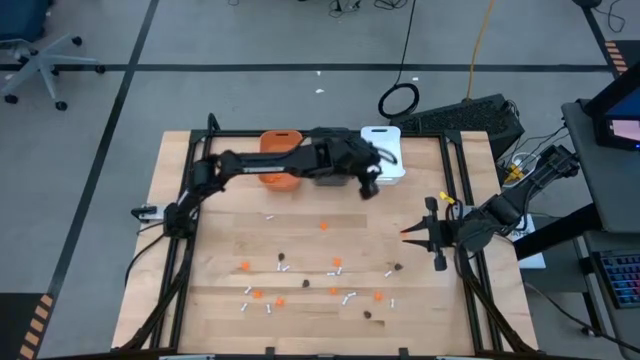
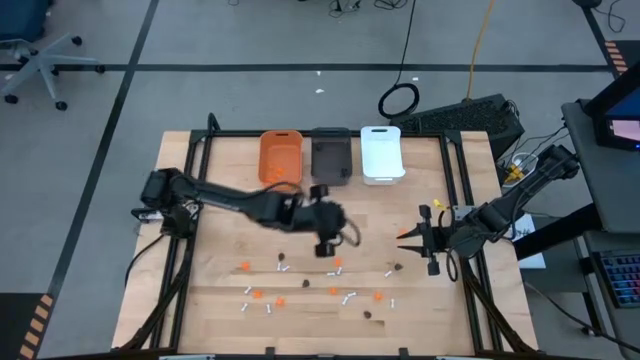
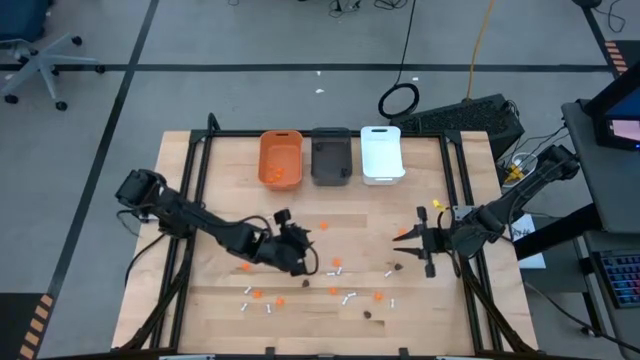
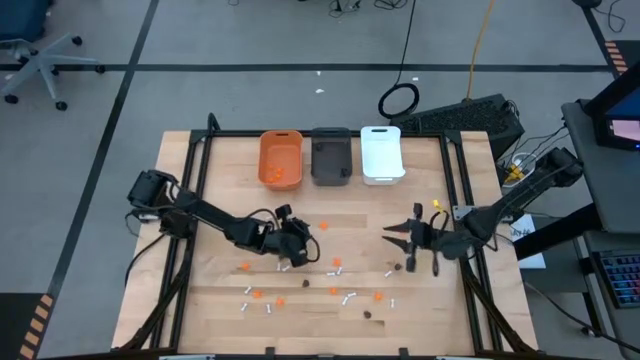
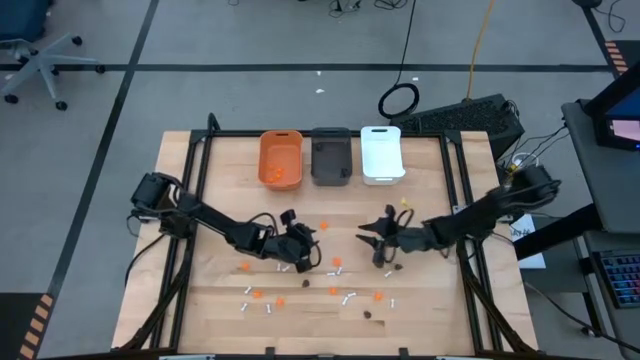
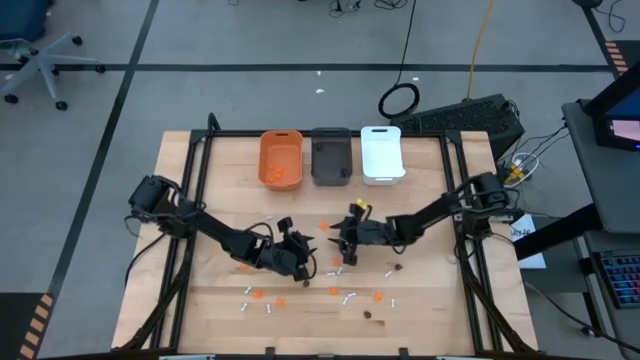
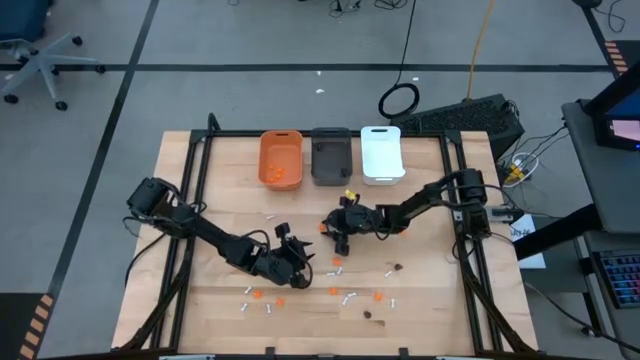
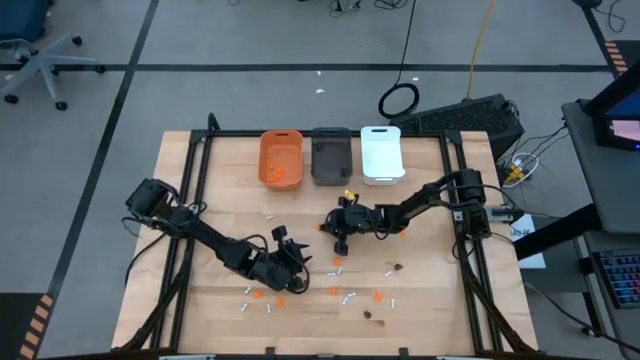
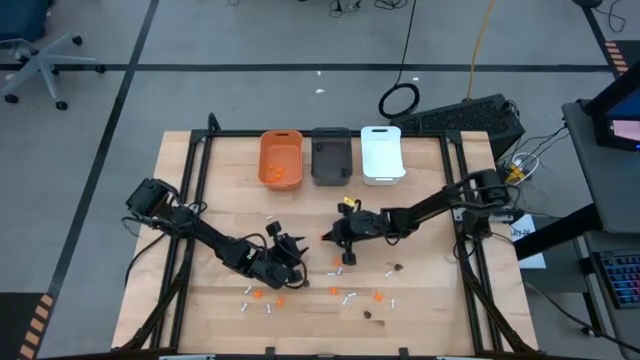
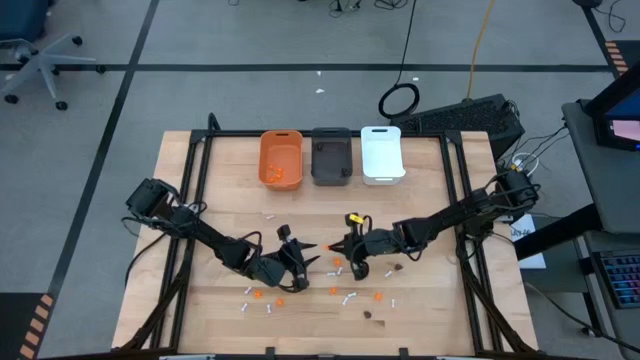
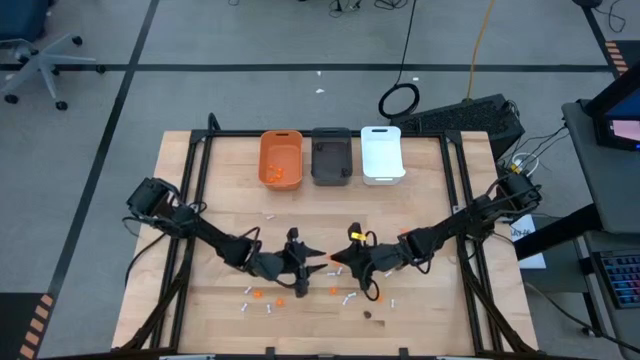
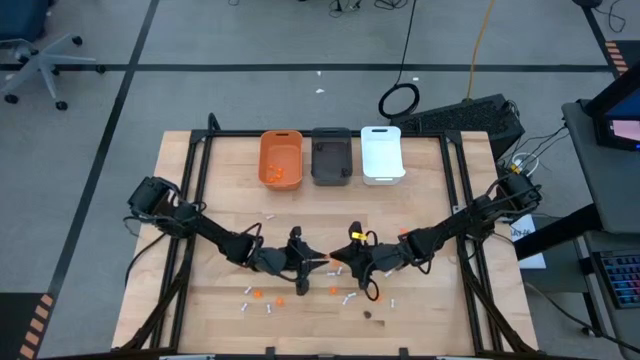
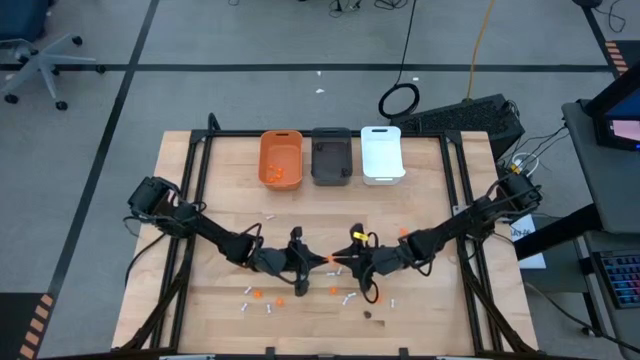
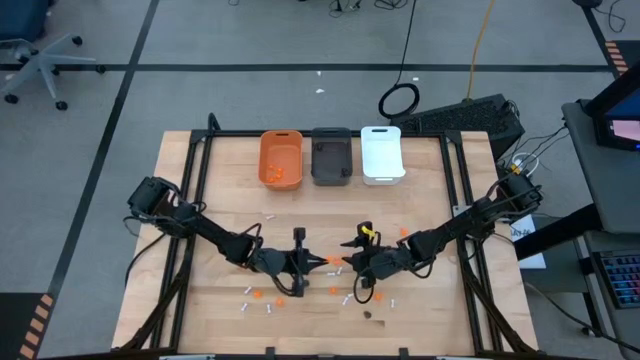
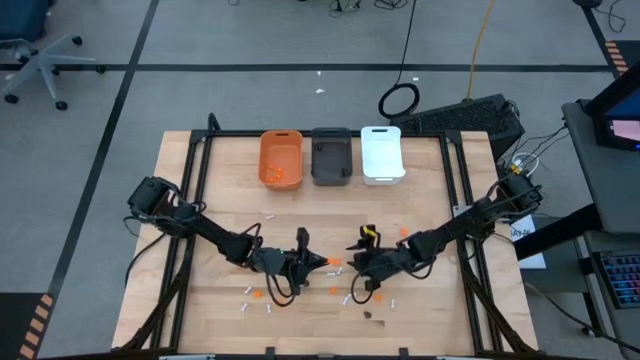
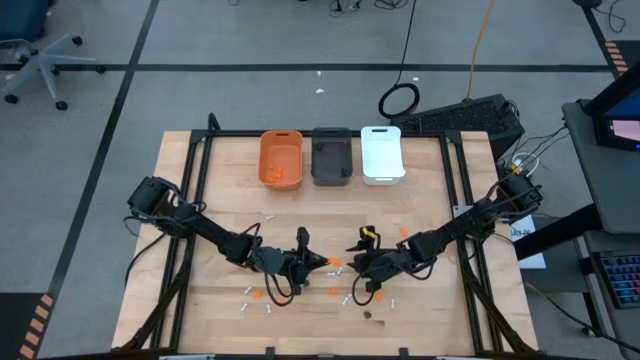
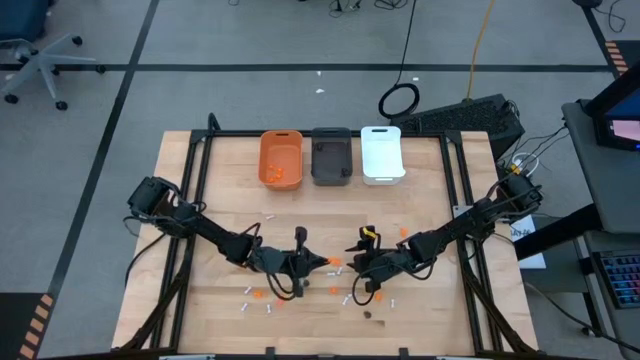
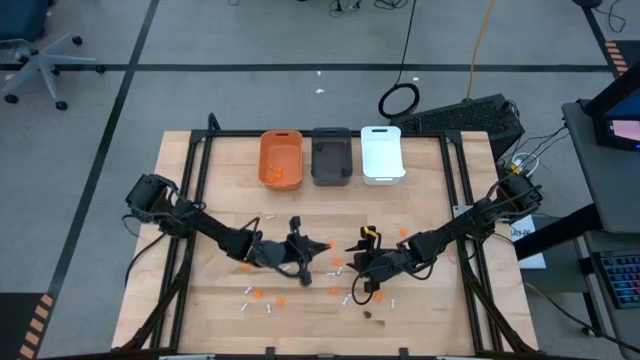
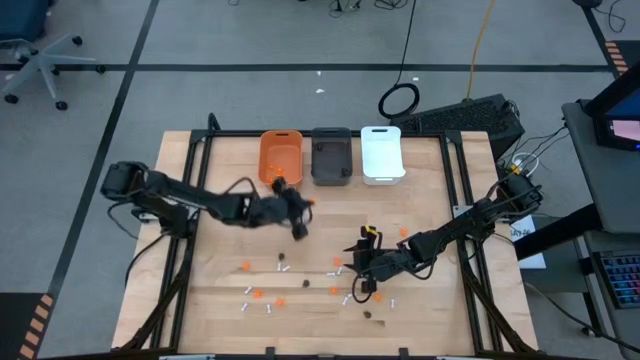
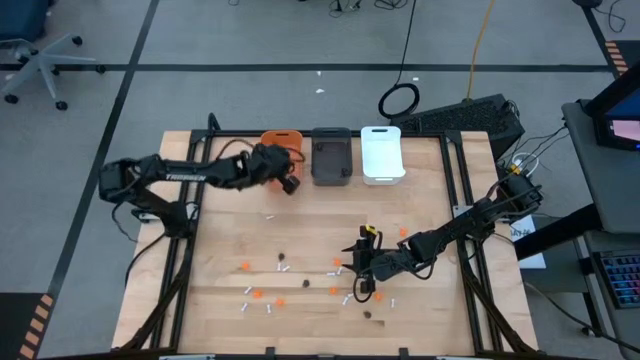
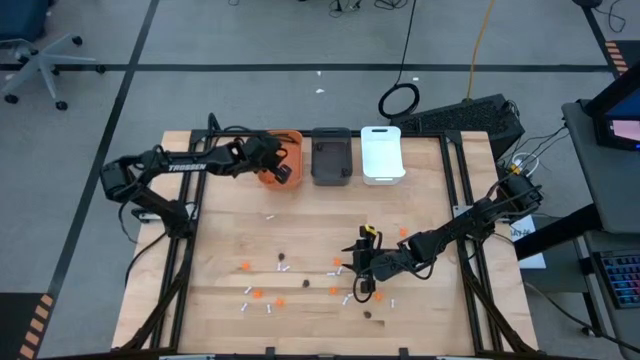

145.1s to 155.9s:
Task: Sort Halloween decoration
Put the orange spider toy into the orange bin

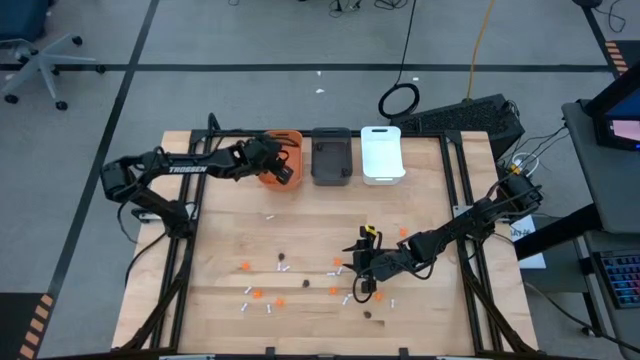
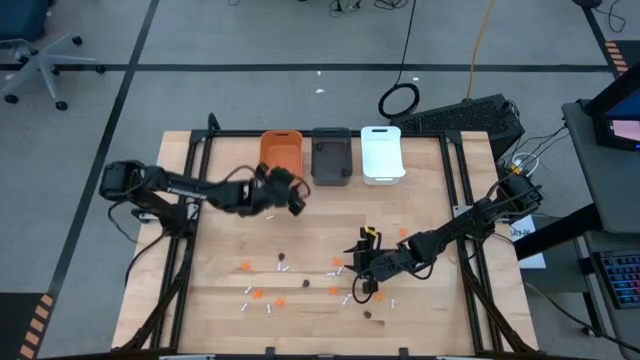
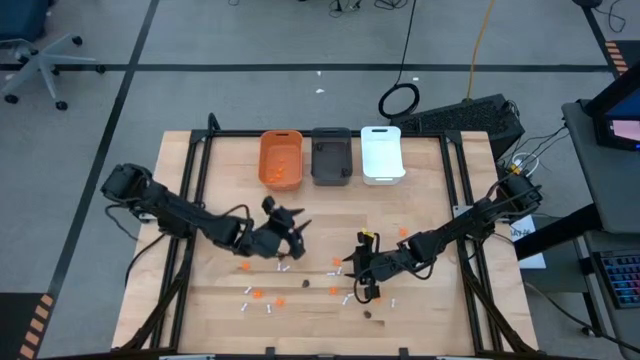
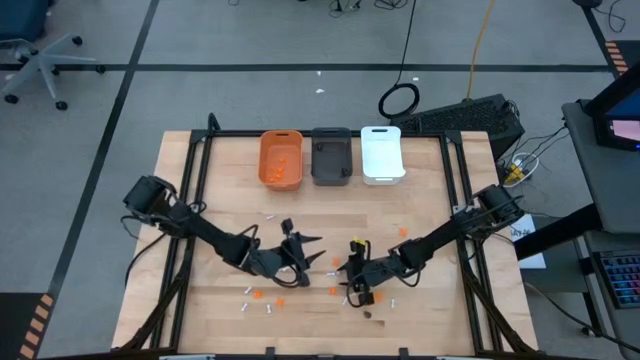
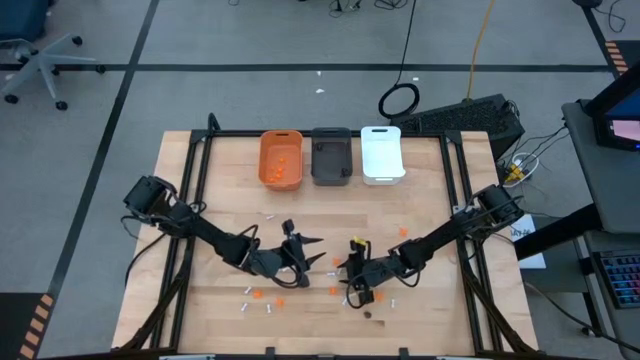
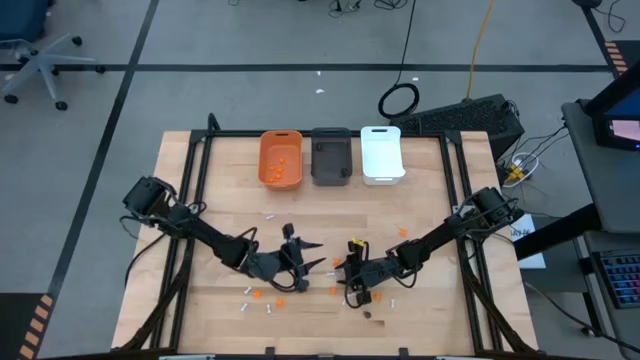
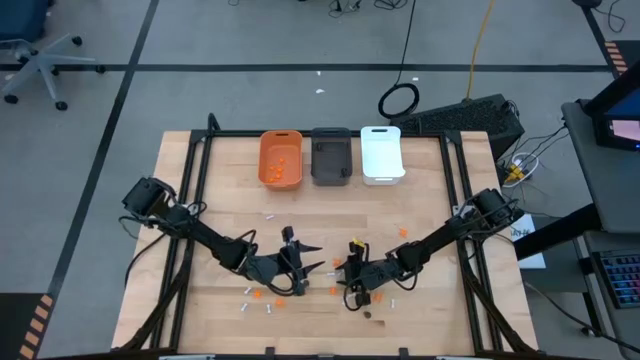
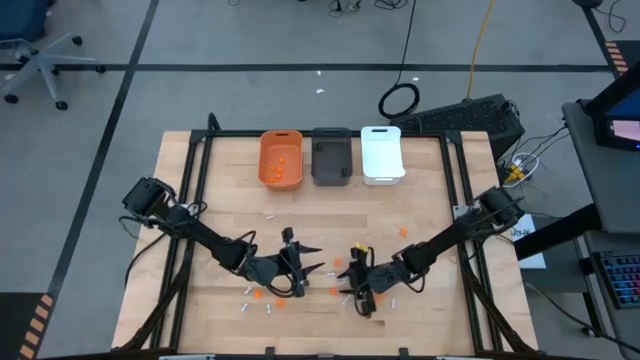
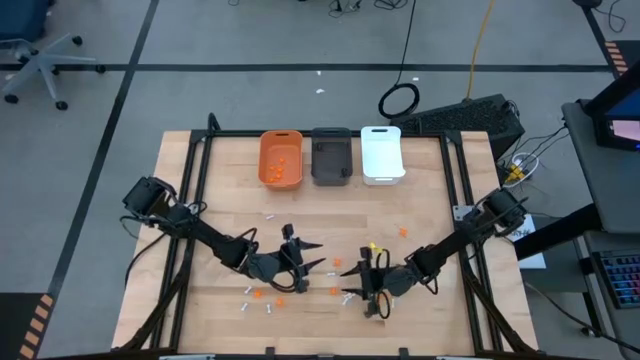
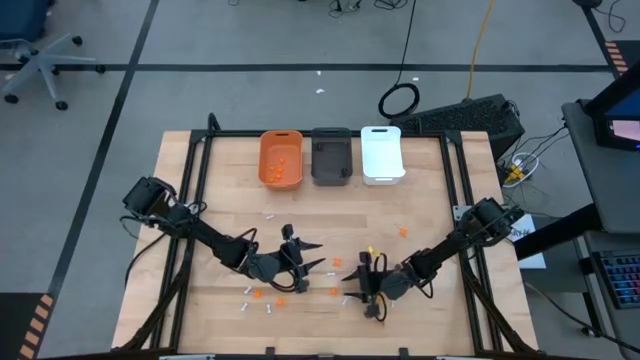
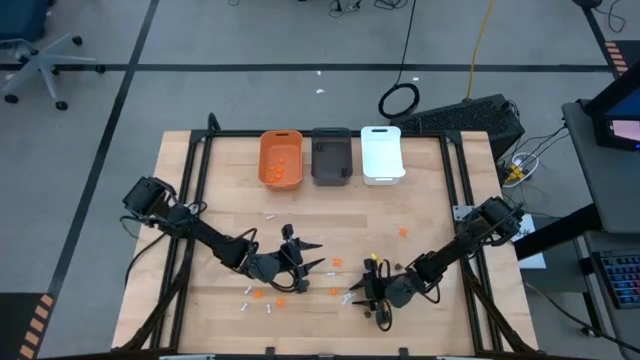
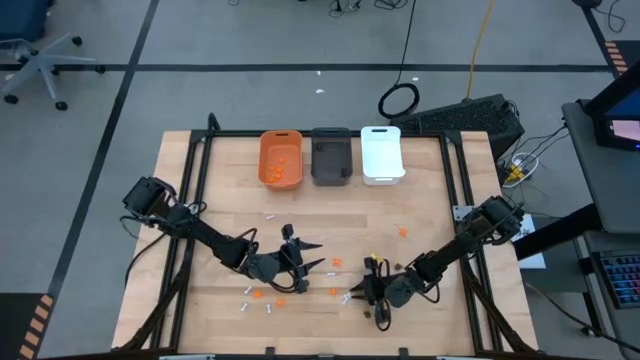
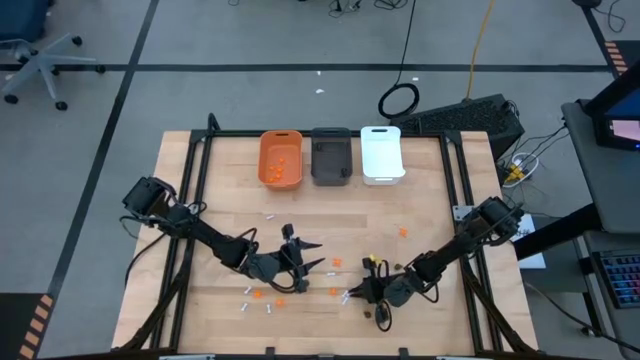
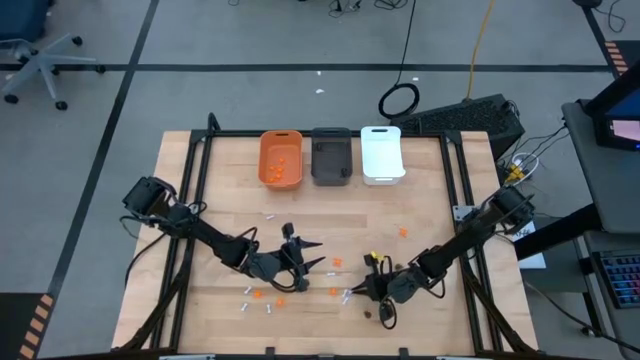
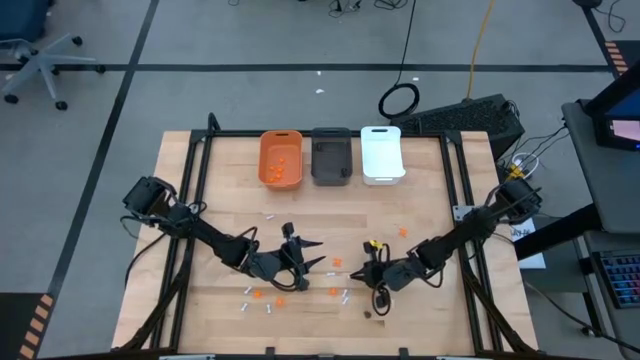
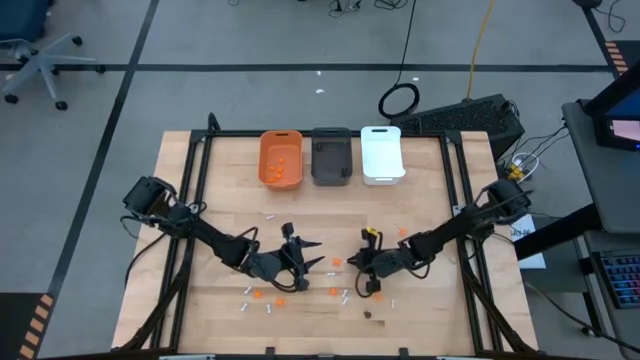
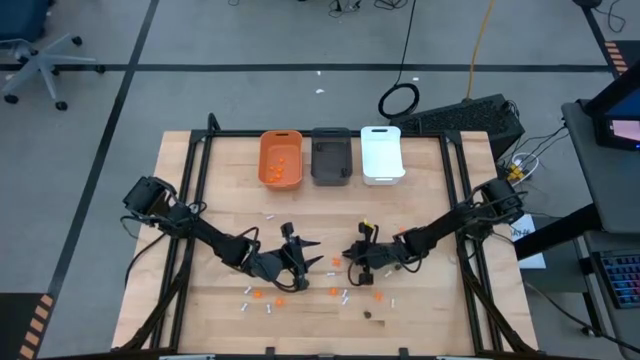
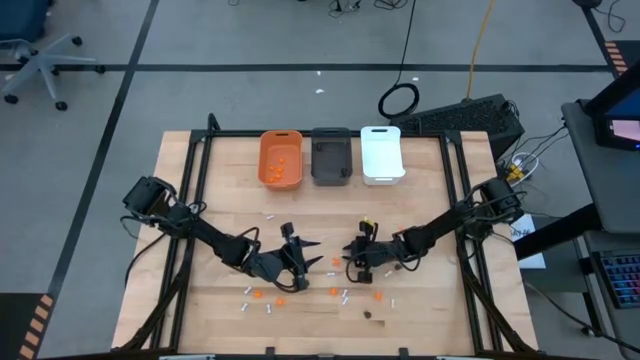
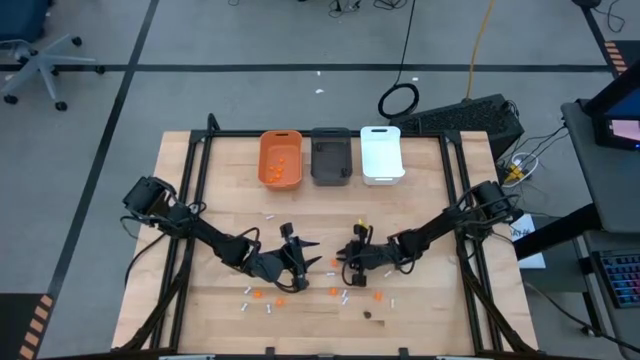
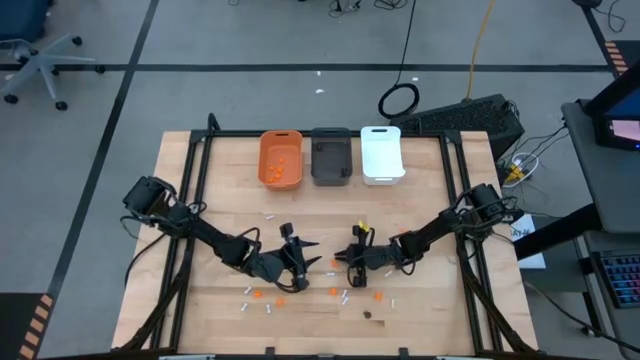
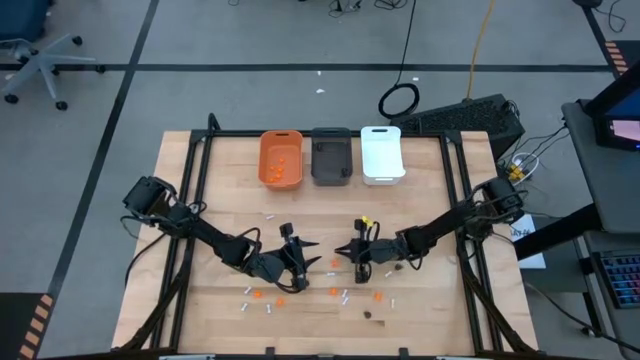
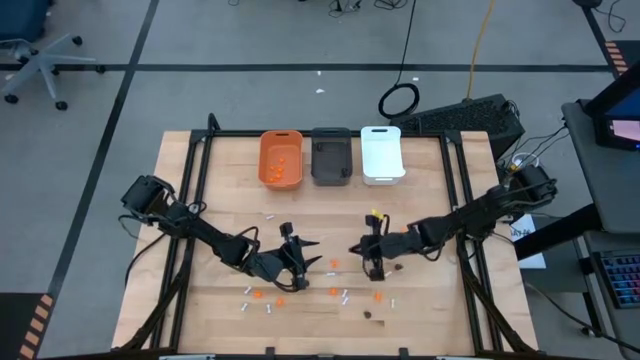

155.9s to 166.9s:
Put the white bone toy into the white bin
